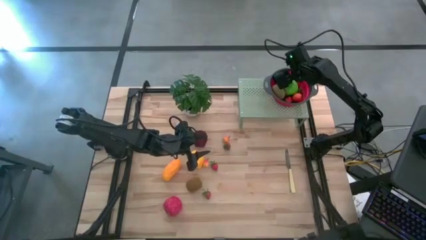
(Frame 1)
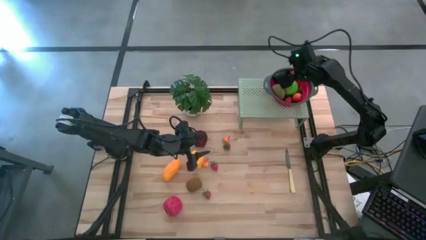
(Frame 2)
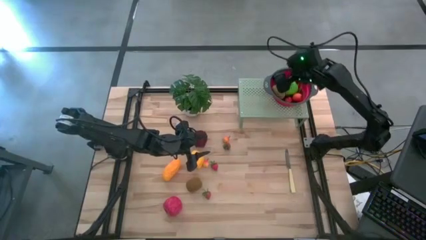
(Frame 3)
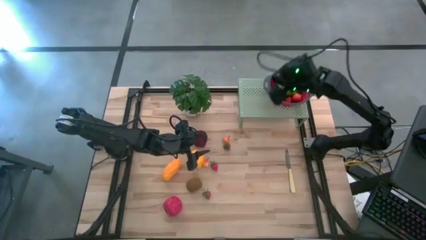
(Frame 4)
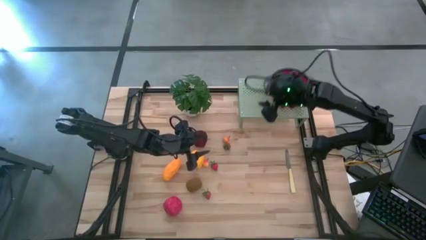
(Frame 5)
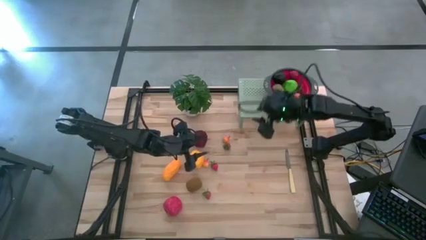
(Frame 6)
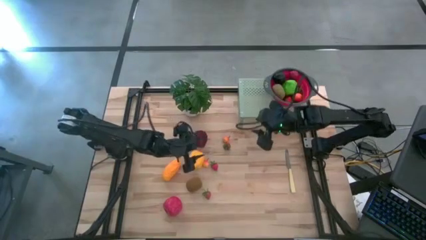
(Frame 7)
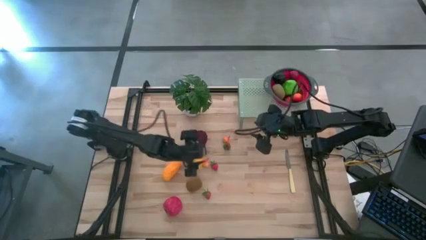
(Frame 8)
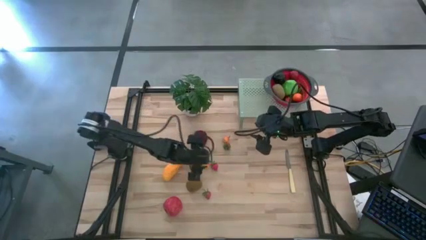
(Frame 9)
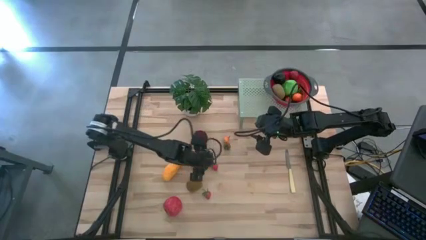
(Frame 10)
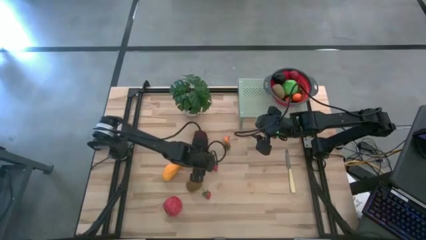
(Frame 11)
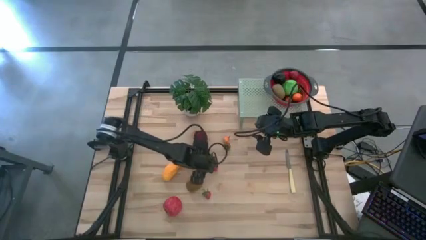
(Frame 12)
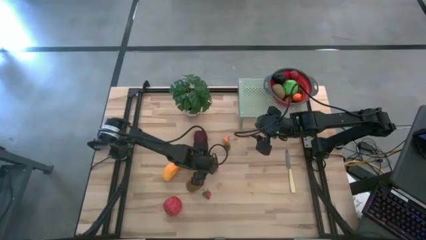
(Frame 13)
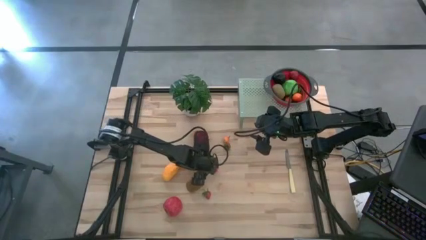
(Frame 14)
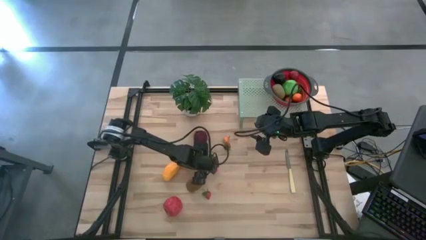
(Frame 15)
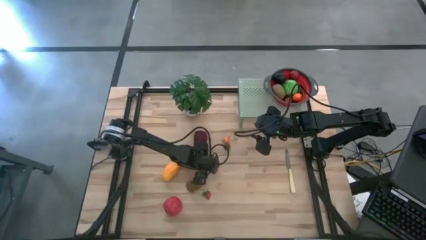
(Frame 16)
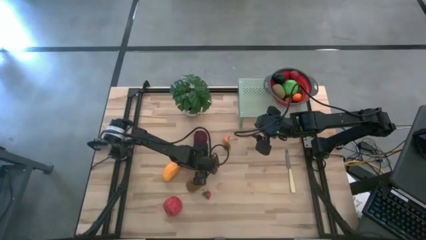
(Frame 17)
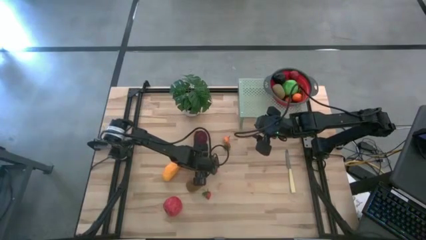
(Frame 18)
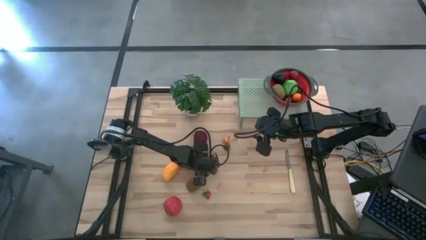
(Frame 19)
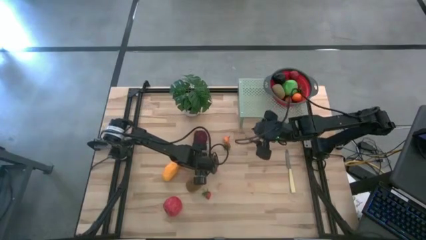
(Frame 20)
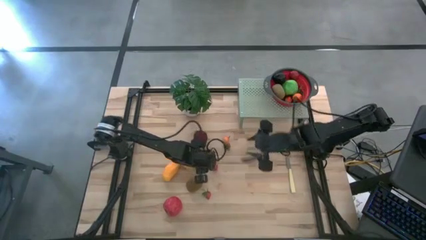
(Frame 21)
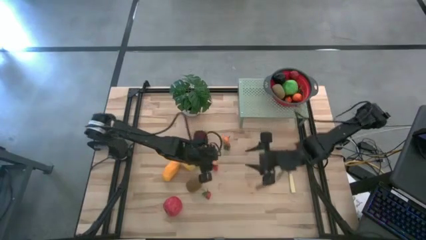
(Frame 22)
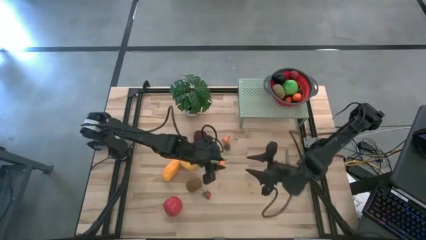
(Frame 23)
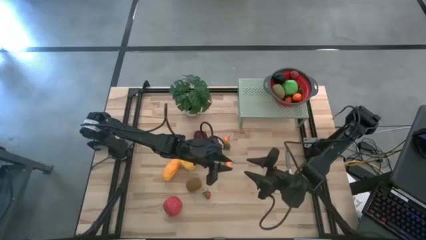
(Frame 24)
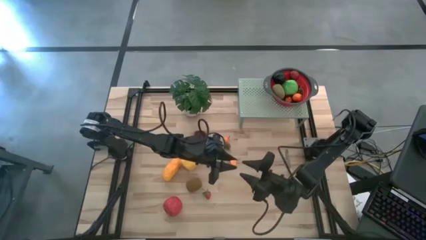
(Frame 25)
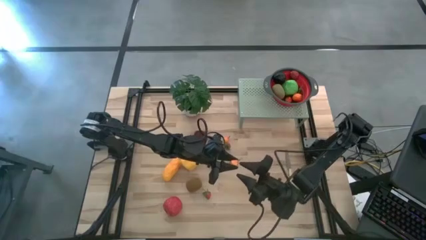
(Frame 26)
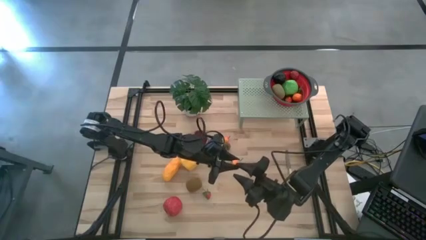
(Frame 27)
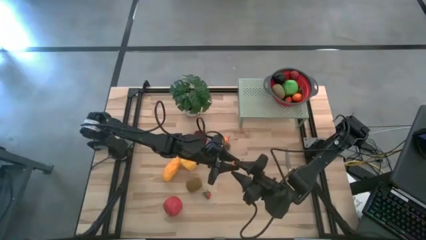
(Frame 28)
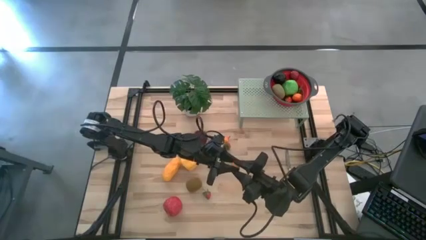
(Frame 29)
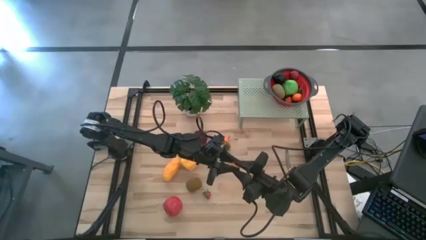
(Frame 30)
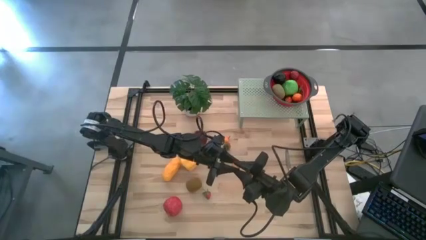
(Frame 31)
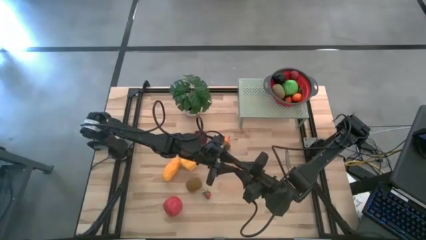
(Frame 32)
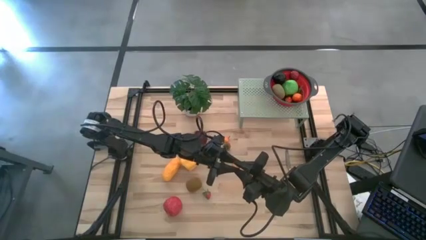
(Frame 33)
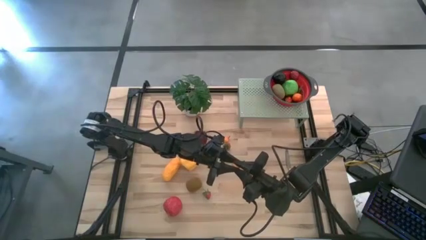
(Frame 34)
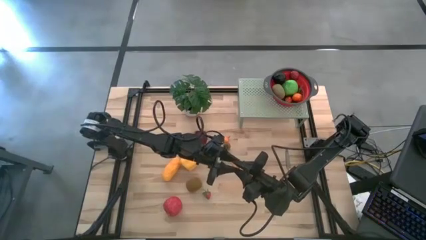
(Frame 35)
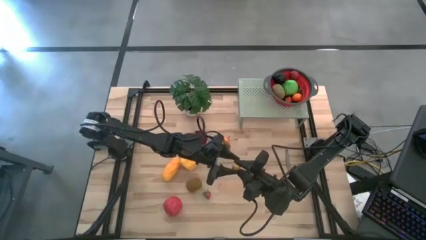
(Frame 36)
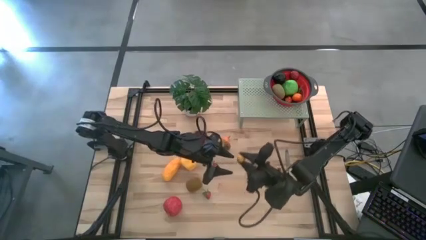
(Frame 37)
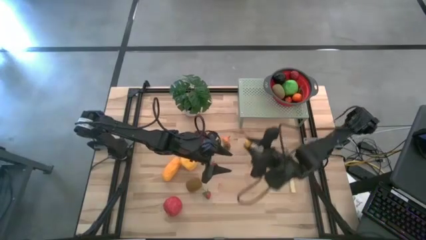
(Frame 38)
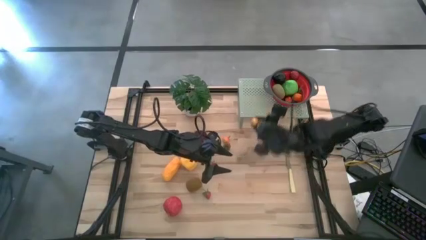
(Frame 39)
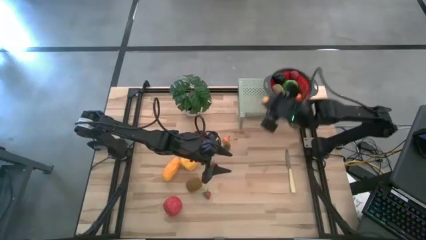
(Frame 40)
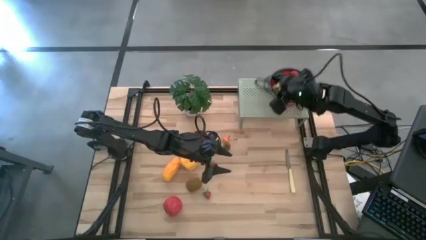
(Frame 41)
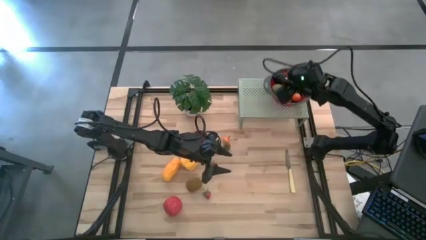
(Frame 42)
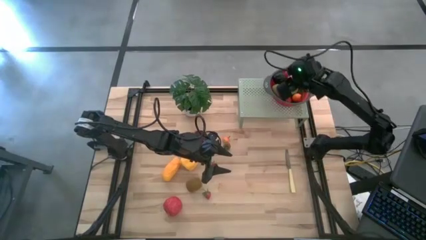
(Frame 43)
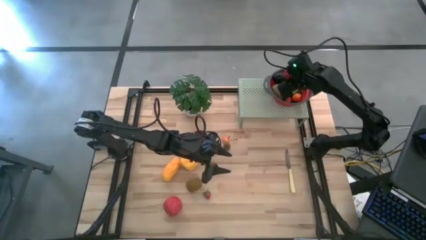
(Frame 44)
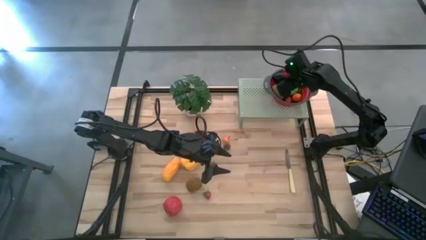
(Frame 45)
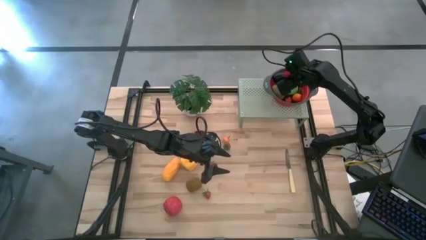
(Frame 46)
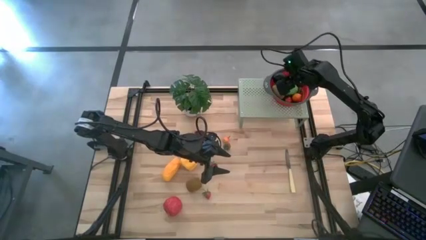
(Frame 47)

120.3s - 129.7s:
Task: Pick & Place Fruit
Put the orange pear into the red strainer bowl on the shelf

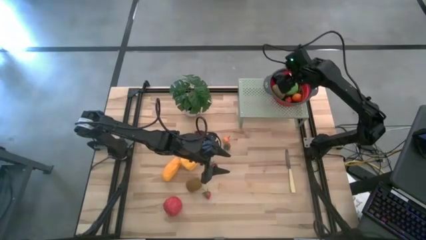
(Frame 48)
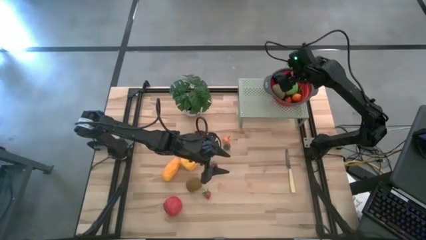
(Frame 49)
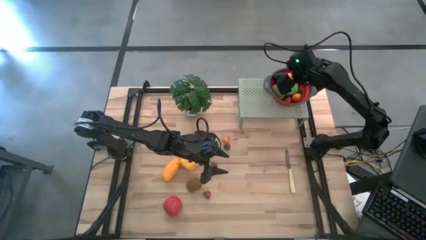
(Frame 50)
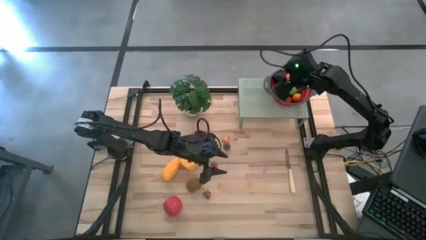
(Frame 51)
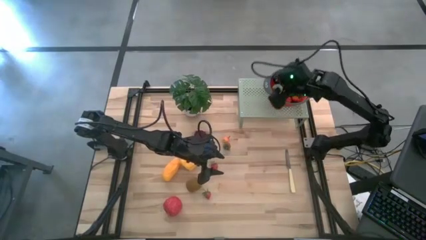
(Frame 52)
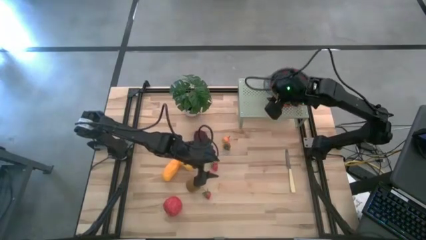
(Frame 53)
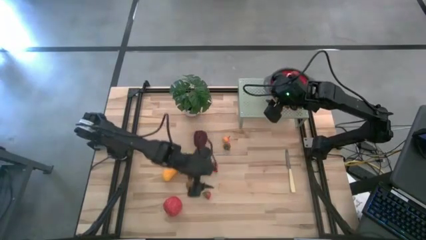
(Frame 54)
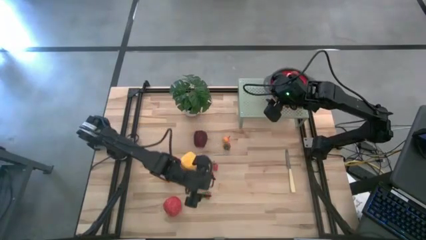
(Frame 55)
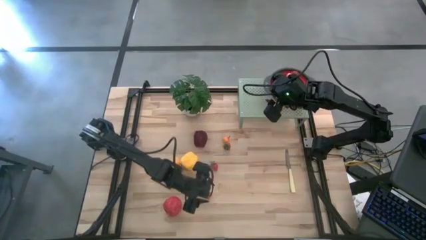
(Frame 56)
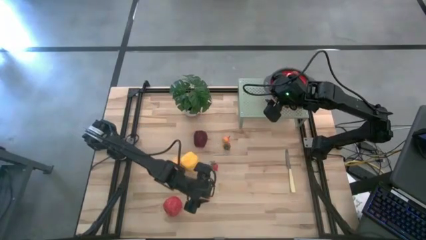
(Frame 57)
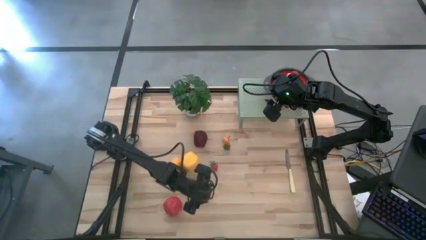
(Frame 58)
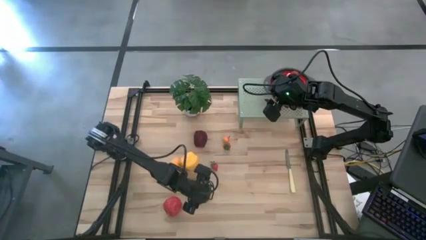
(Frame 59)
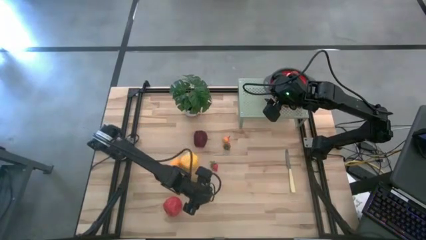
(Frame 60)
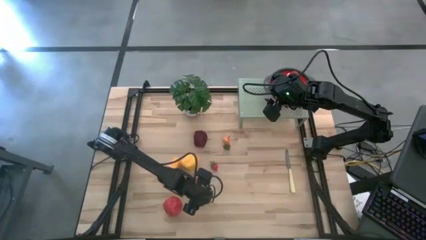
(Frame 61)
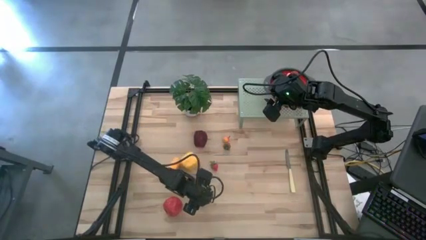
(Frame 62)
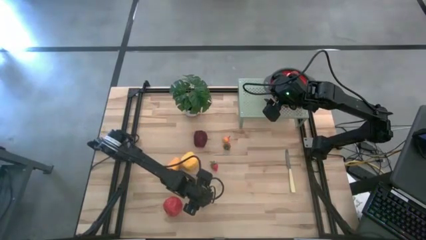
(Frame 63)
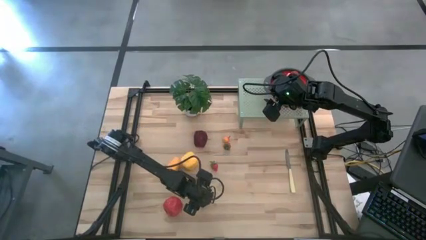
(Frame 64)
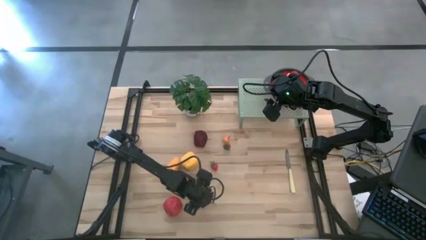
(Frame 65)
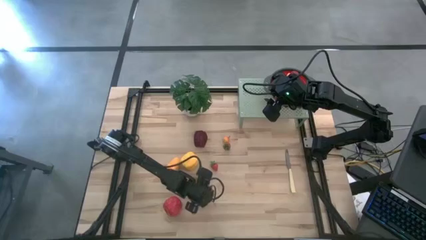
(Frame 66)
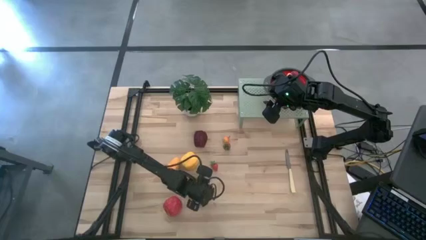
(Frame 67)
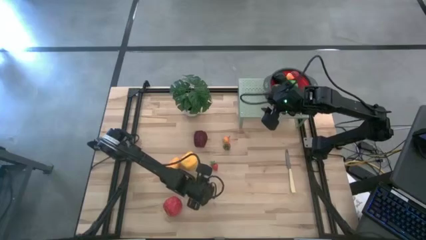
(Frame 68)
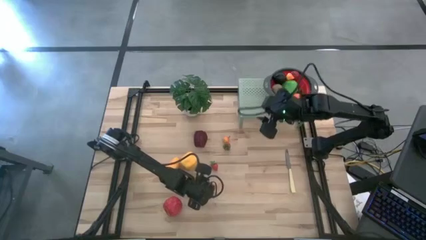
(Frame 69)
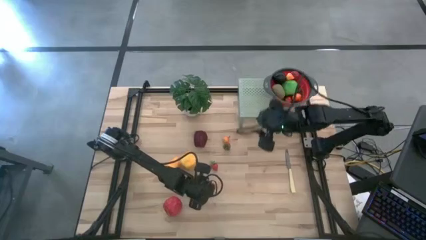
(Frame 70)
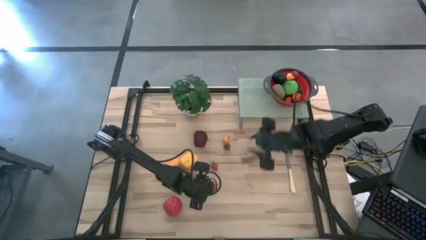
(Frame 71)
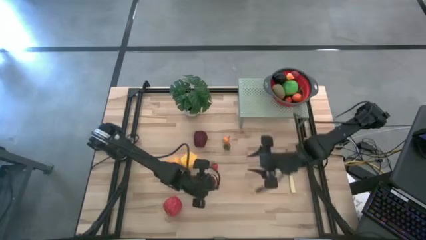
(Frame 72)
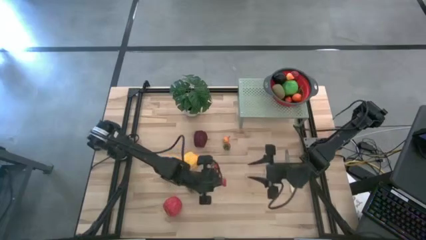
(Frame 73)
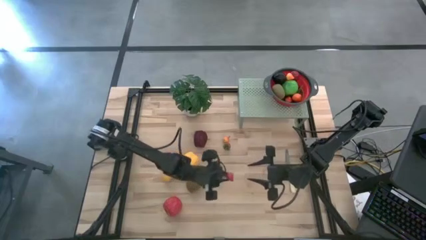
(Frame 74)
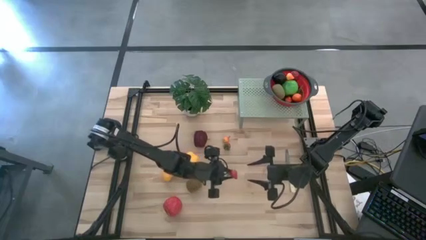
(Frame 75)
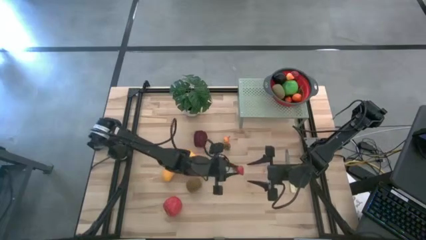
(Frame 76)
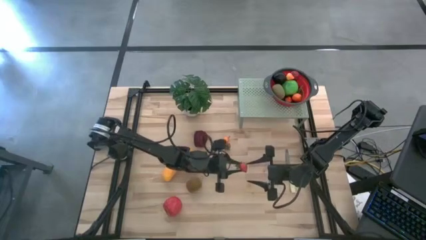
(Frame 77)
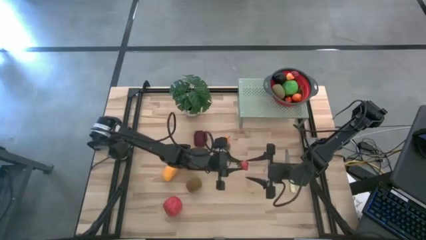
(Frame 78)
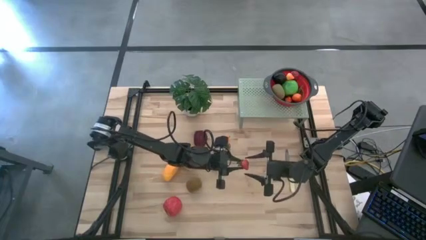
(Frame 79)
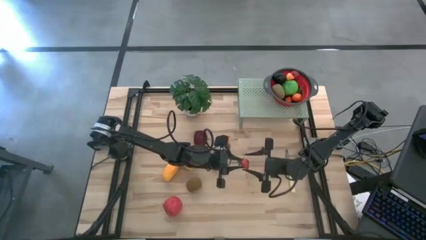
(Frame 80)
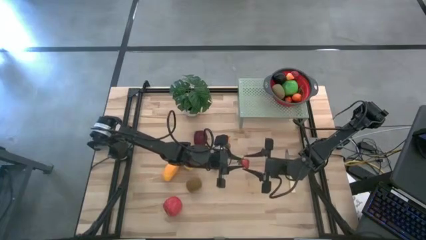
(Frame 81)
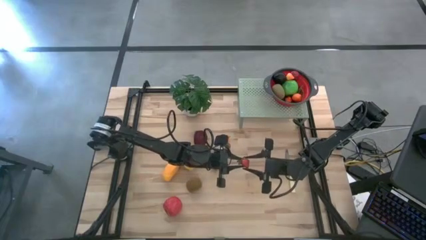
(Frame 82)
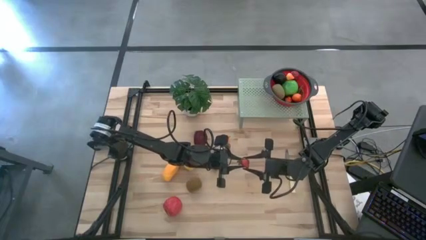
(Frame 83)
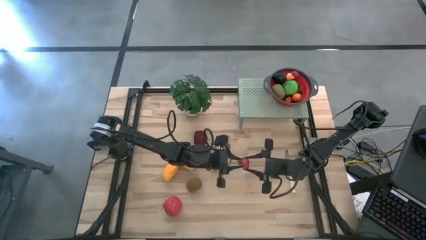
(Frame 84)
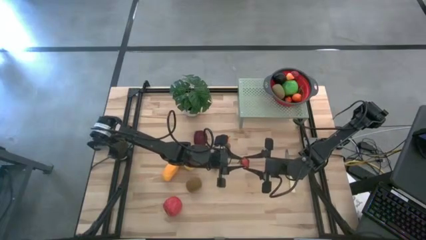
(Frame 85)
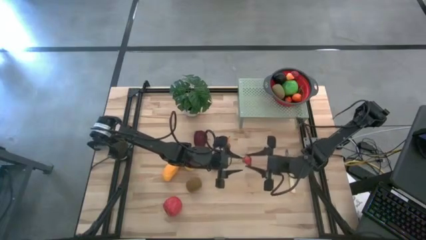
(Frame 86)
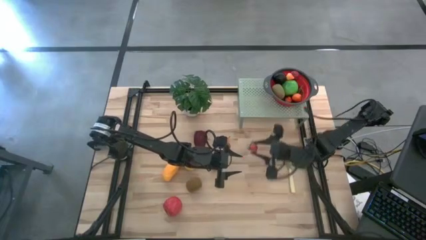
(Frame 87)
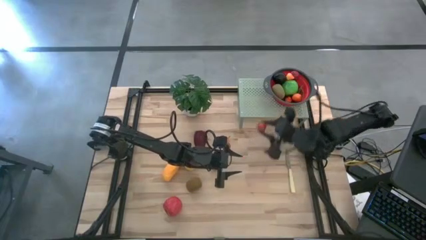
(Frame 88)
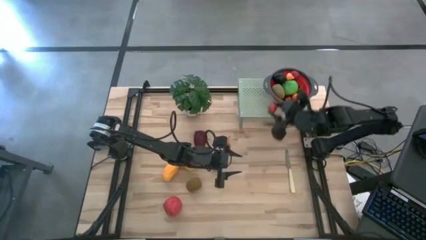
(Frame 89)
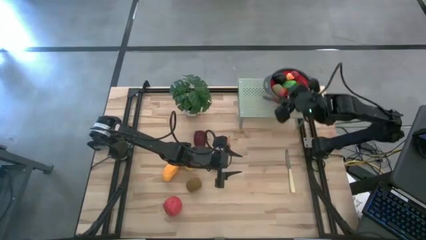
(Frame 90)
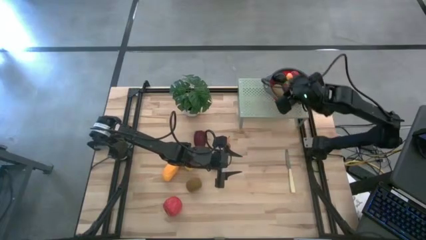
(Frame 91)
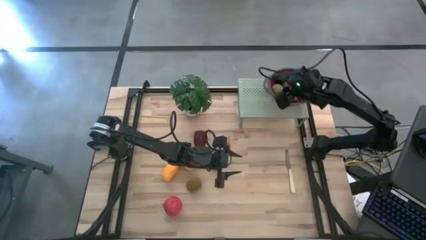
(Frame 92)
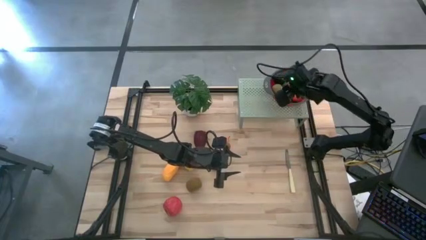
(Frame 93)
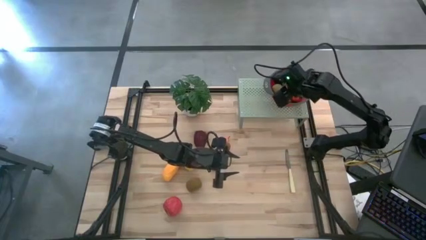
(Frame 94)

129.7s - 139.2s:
Put the red strawberry into the red strainer bowl on the shelf
